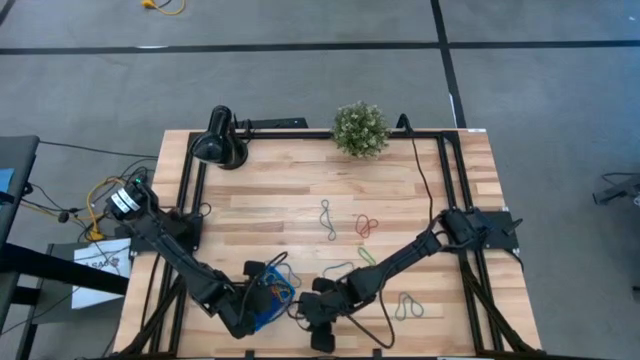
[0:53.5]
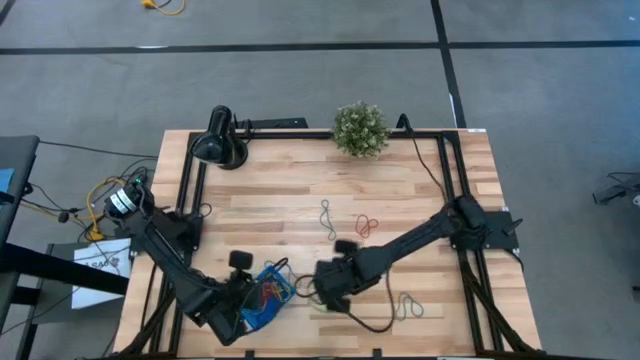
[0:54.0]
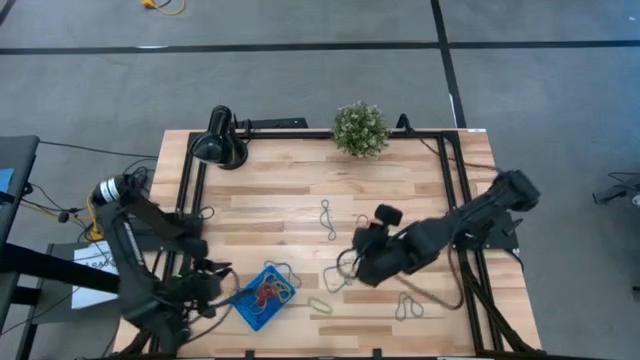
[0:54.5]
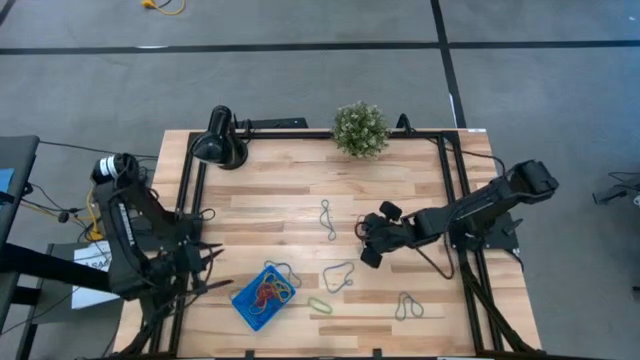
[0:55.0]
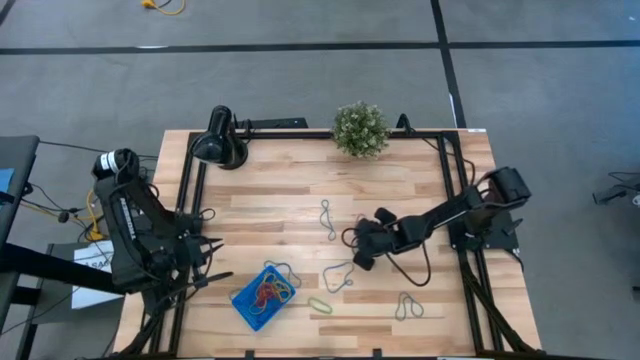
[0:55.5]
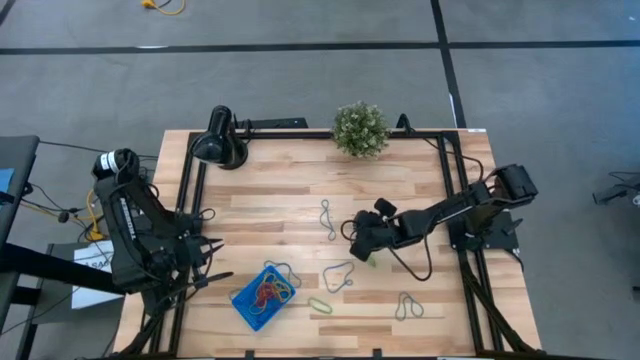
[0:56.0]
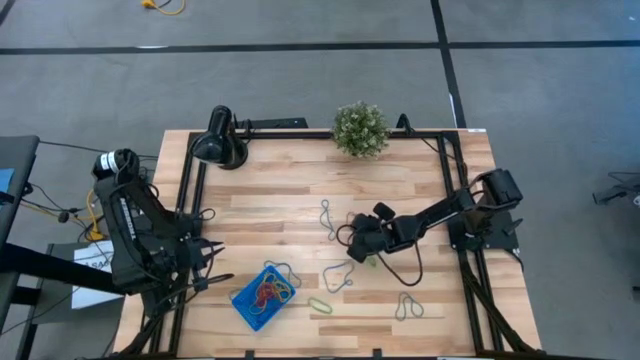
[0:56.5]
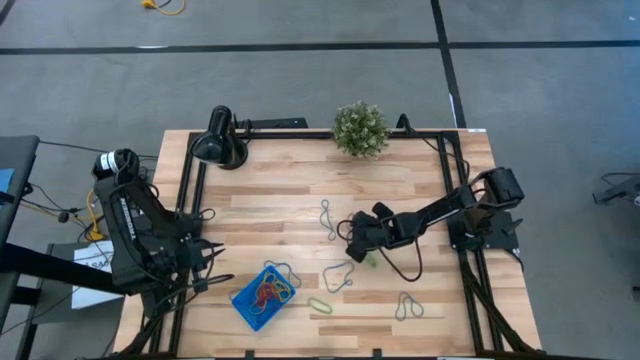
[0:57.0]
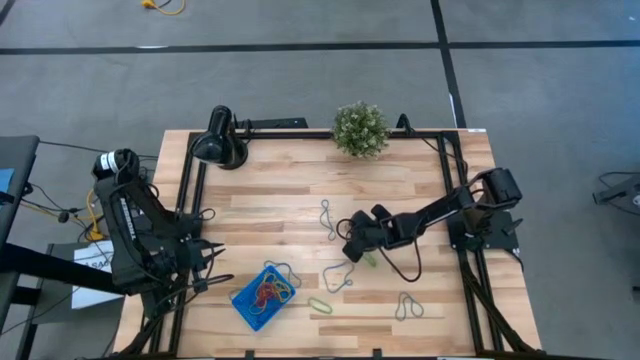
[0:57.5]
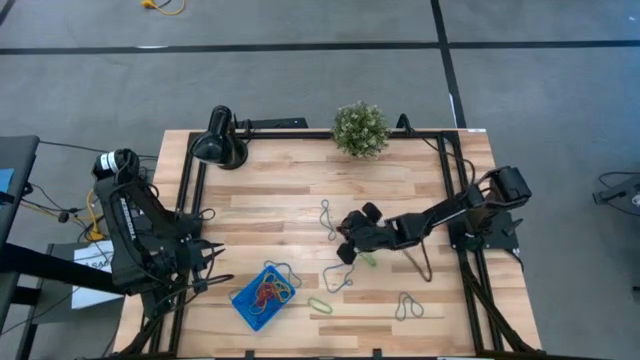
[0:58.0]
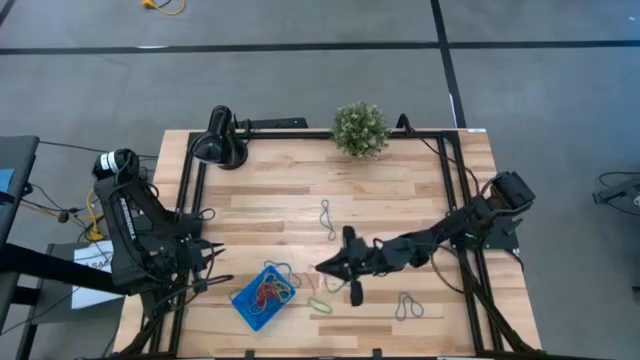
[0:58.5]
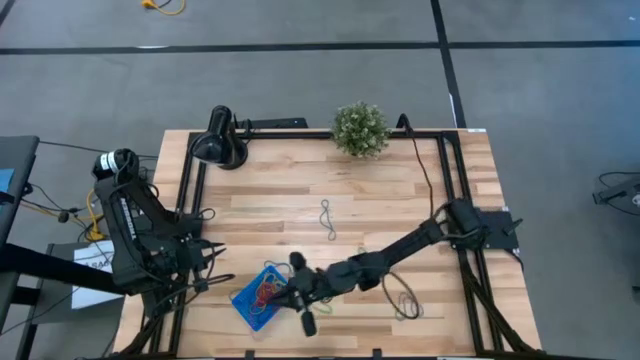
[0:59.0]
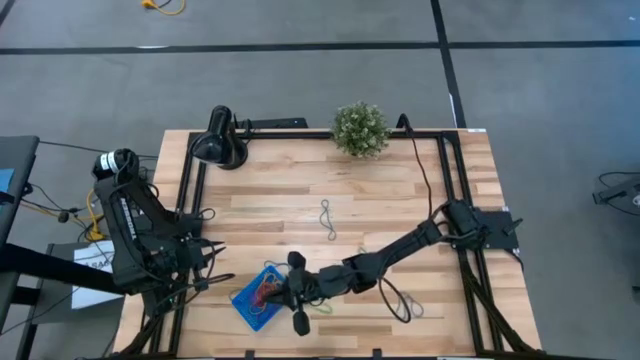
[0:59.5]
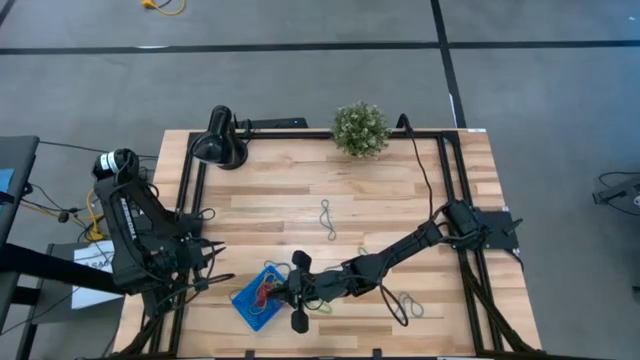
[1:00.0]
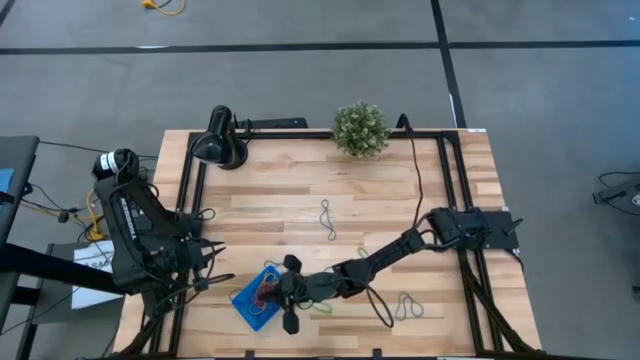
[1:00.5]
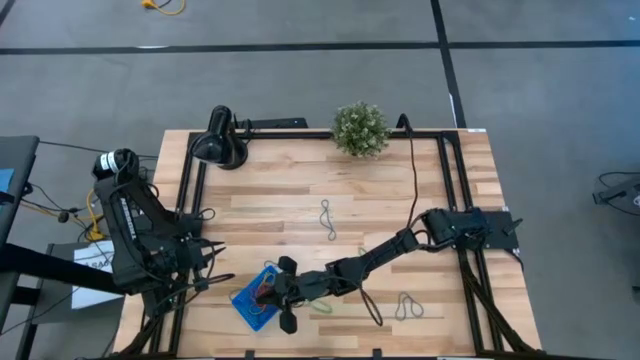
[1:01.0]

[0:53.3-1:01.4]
Task: Pick and place rubber bands into bin
Put the red rubber band into the blue basket

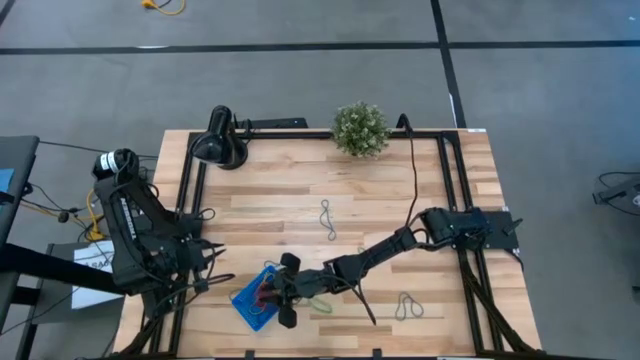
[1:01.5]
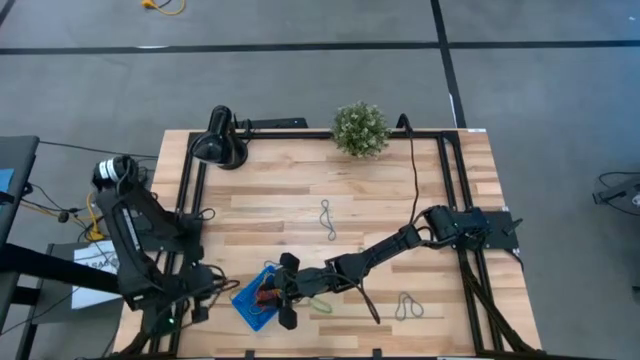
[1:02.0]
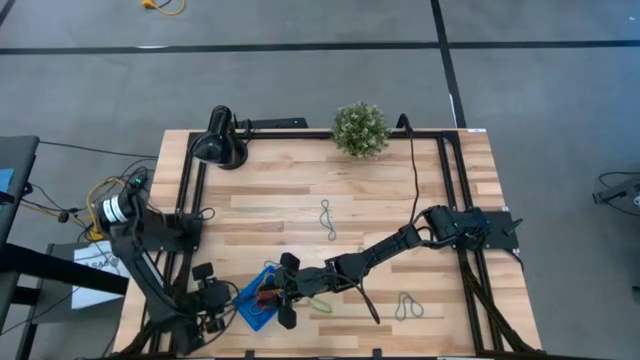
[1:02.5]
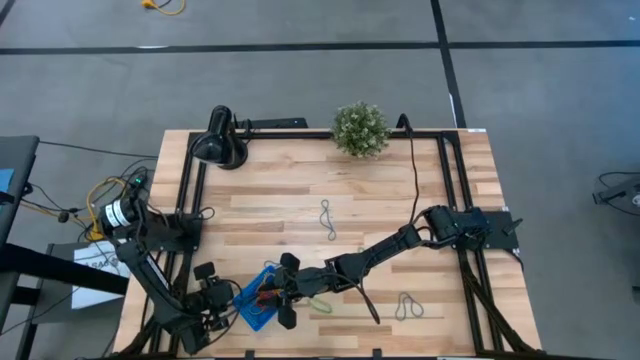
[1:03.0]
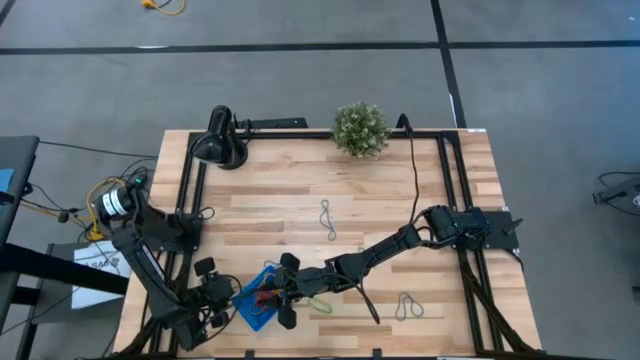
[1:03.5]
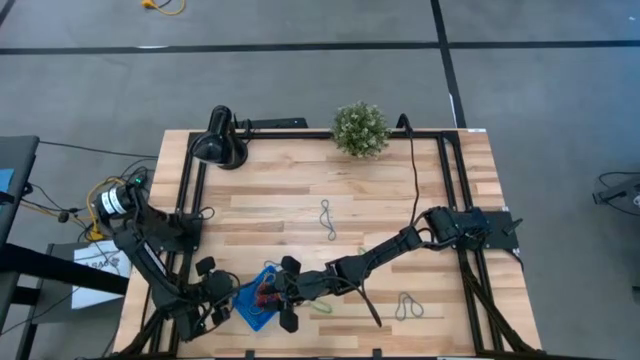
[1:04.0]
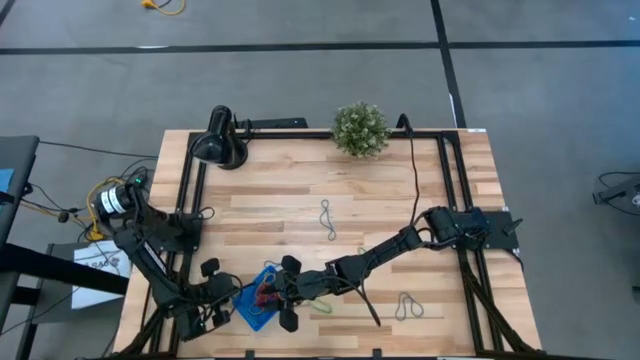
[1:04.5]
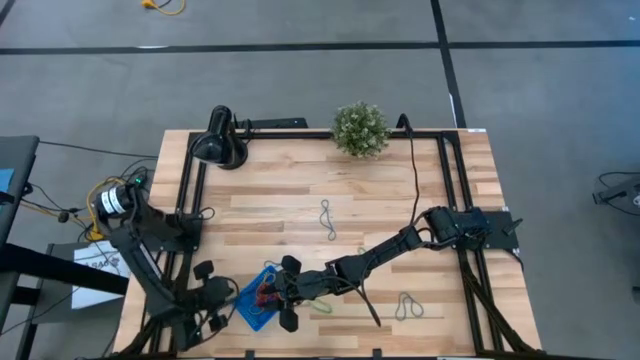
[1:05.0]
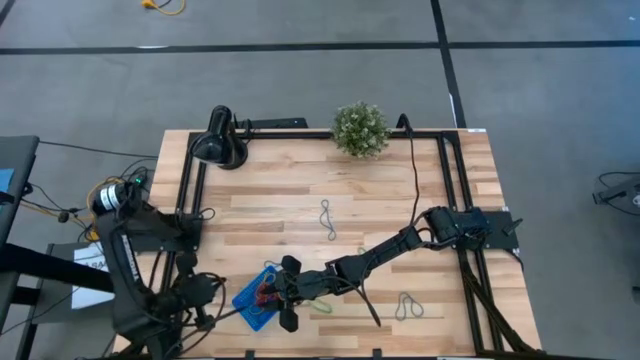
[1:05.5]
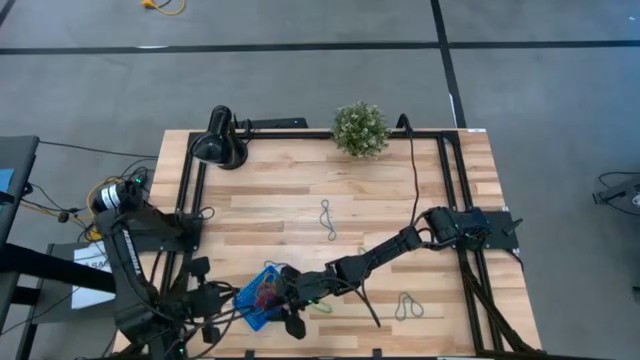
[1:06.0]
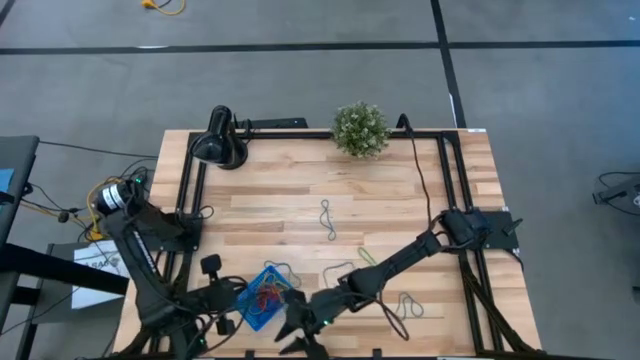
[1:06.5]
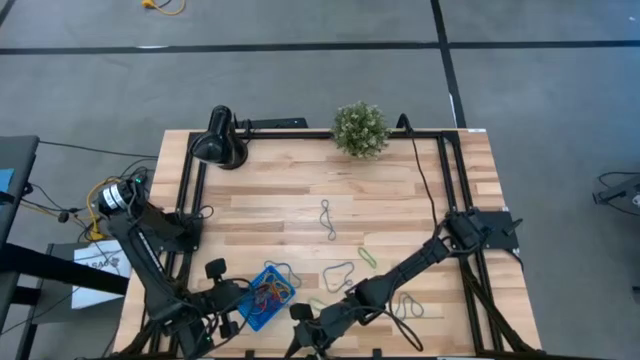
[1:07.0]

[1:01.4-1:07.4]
Put the blue rubber band into the blue basket

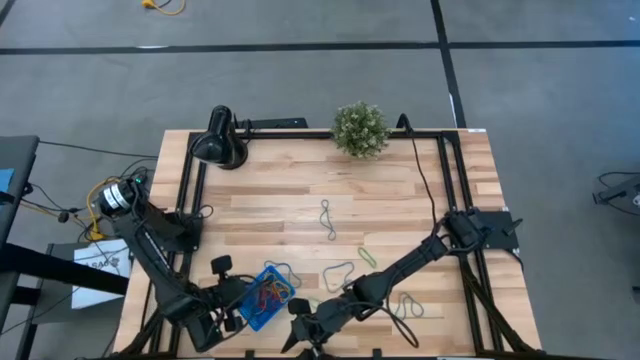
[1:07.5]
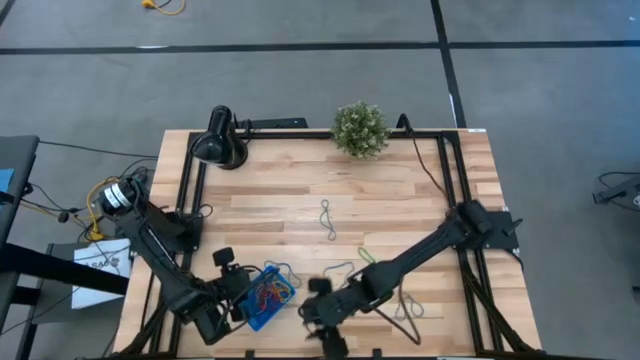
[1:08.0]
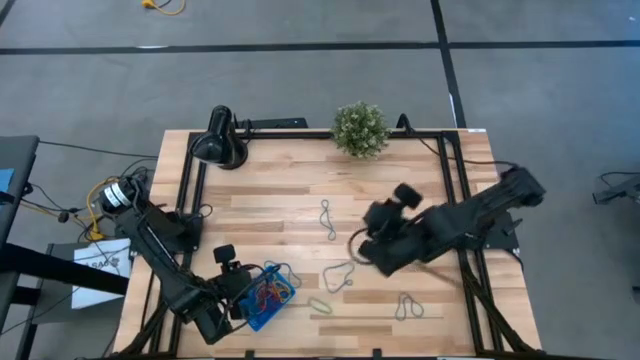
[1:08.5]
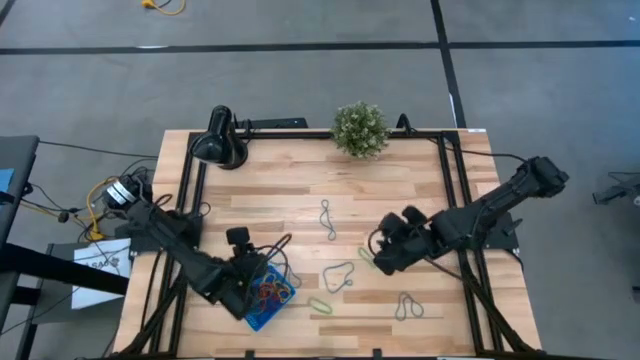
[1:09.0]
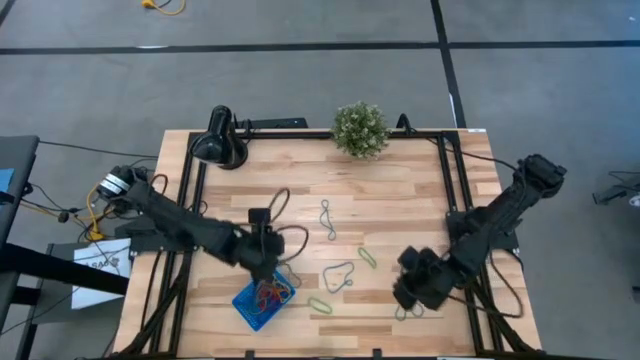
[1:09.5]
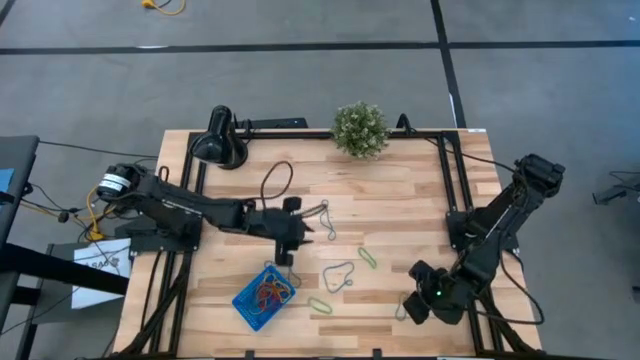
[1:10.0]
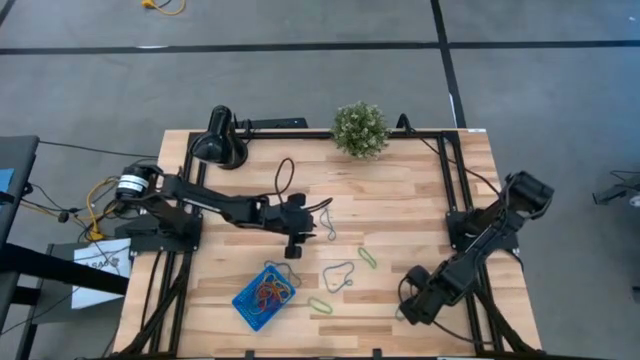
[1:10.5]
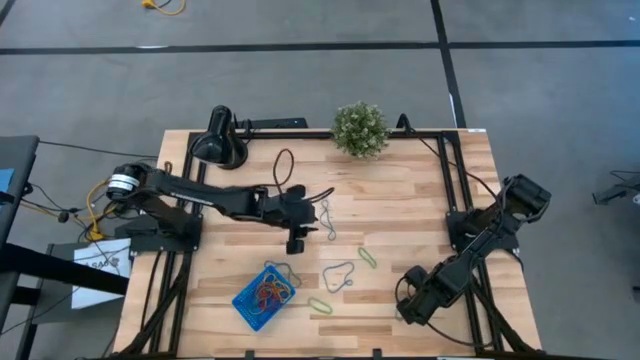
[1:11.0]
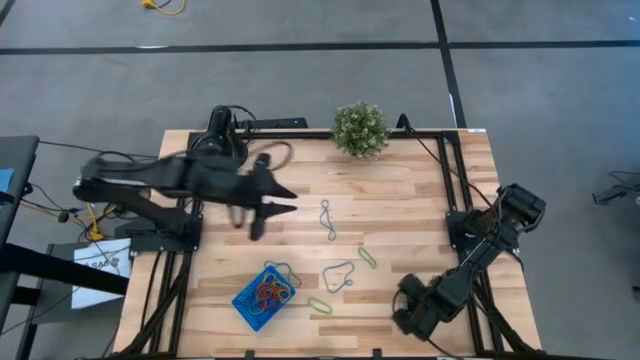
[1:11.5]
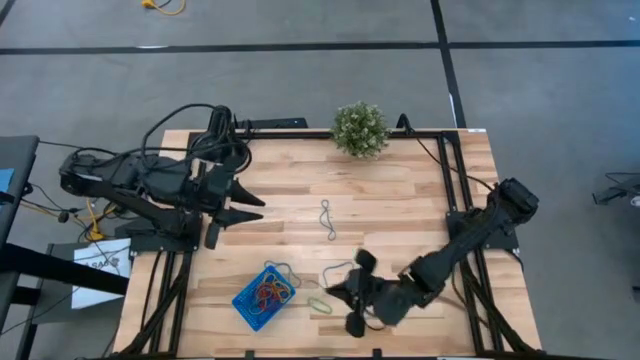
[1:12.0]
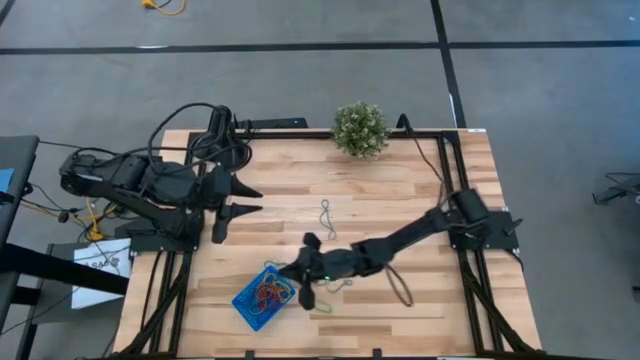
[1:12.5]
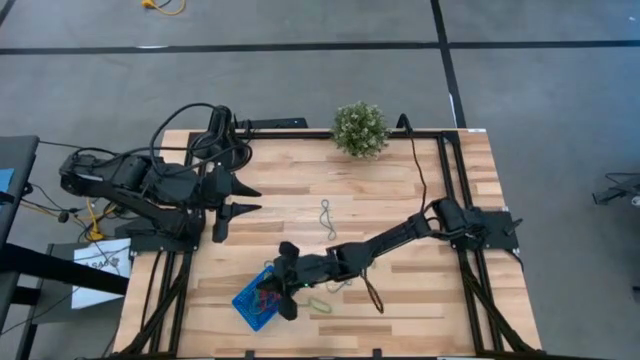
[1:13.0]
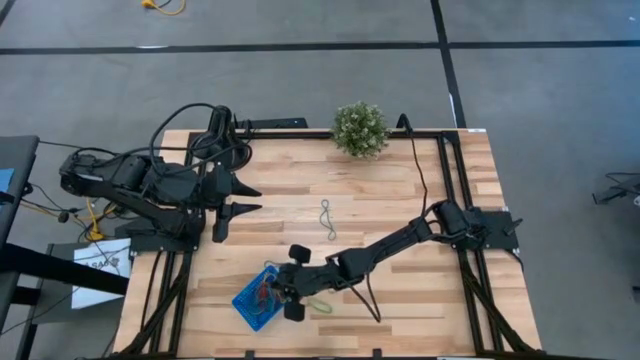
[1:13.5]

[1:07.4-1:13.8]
Put the blue rubber band into the blue basket

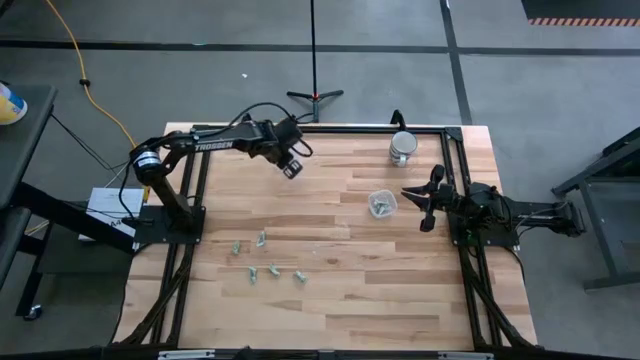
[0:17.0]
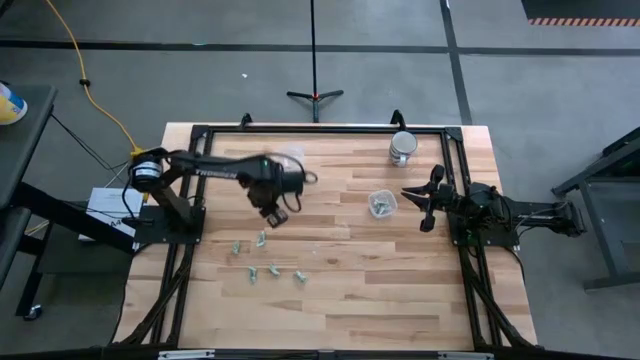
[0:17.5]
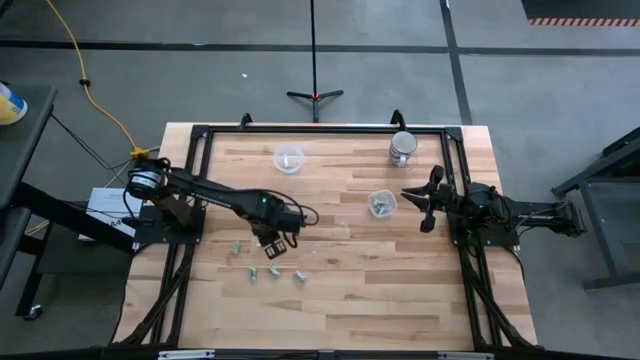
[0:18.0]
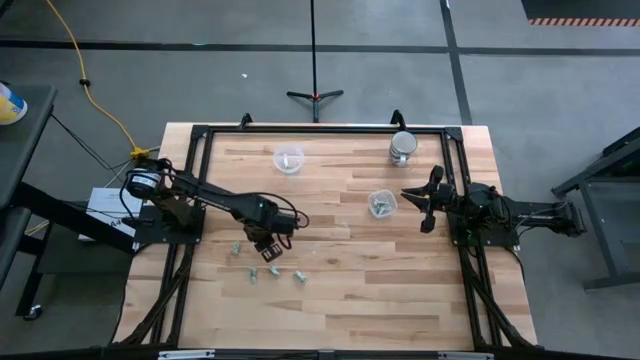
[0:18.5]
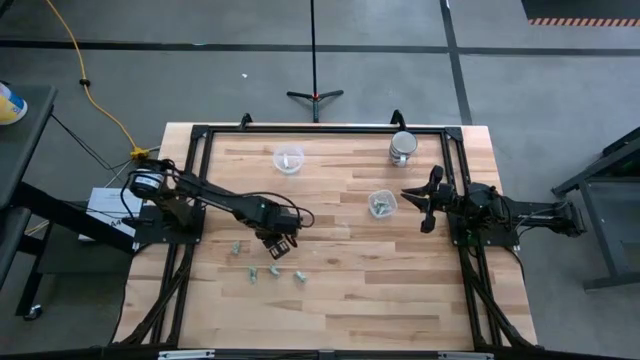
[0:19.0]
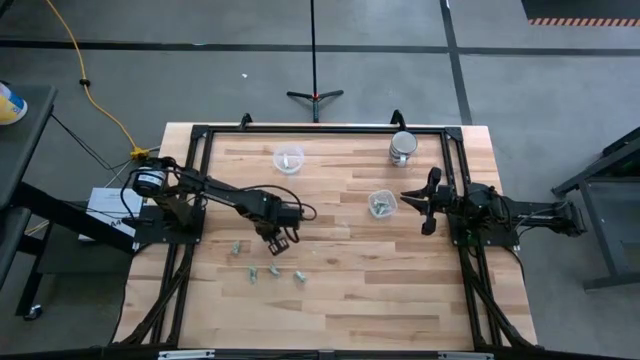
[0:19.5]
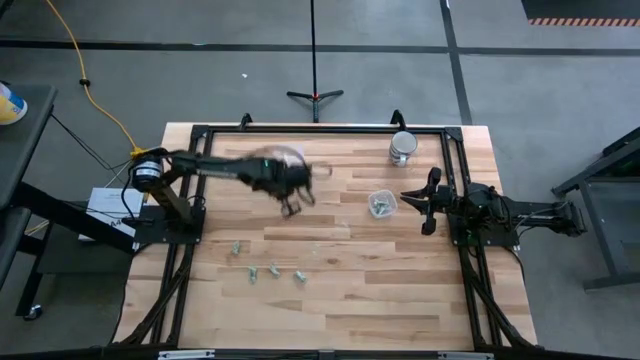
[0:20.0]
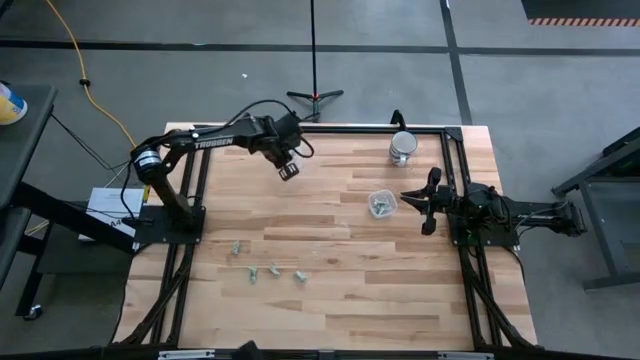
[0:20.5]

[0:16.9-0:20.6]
Task: Pick and place Stevia / Truvia into bins
Put the stevia packet into the round transparent container
